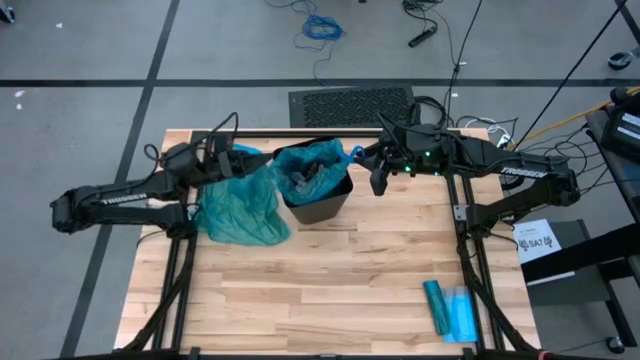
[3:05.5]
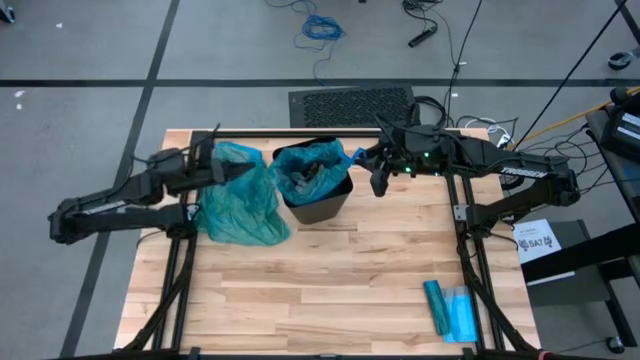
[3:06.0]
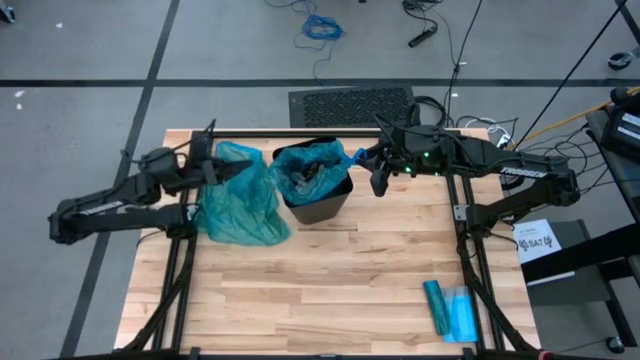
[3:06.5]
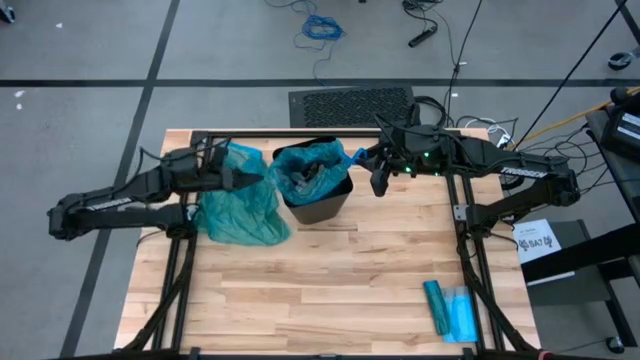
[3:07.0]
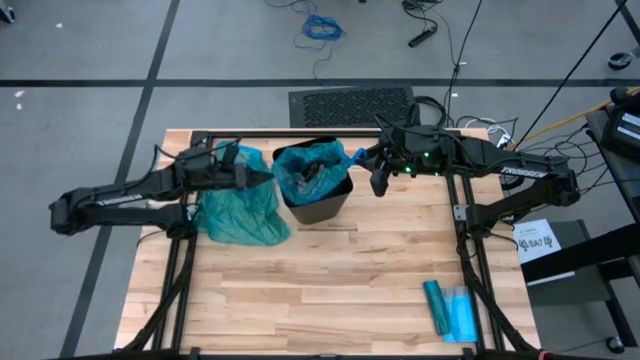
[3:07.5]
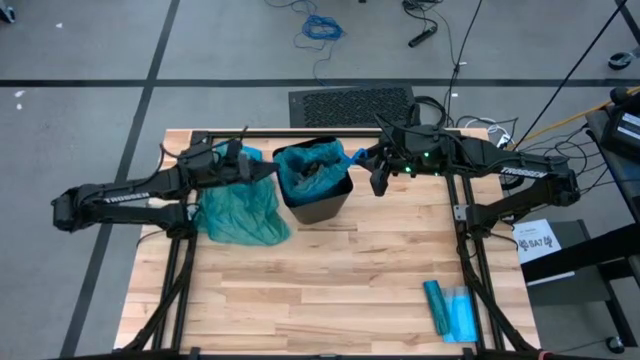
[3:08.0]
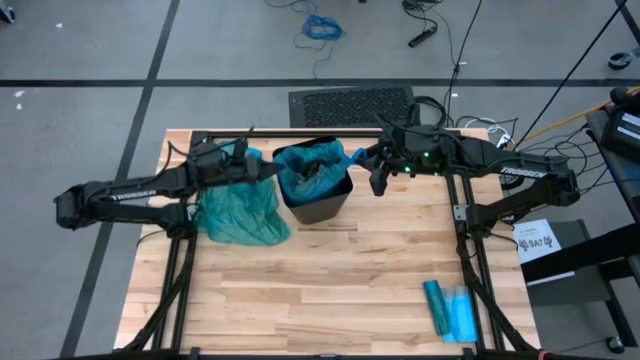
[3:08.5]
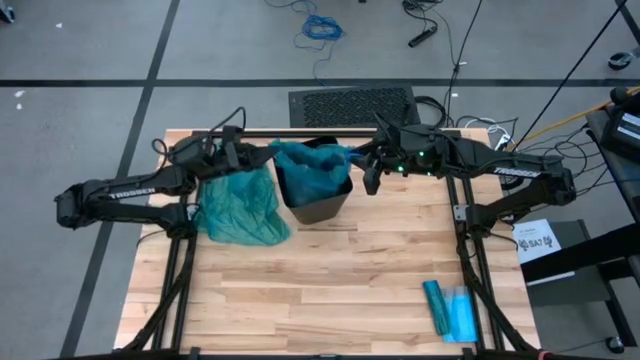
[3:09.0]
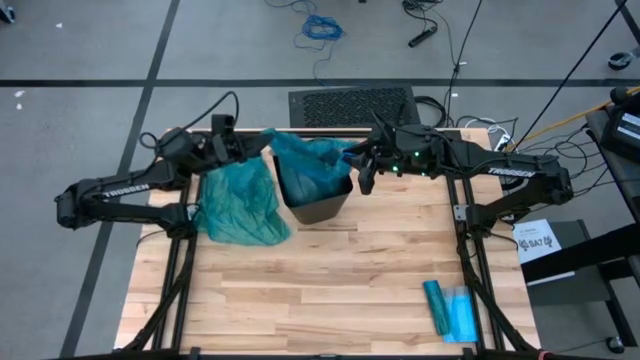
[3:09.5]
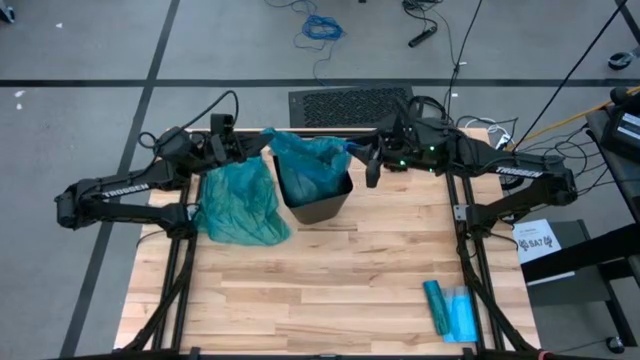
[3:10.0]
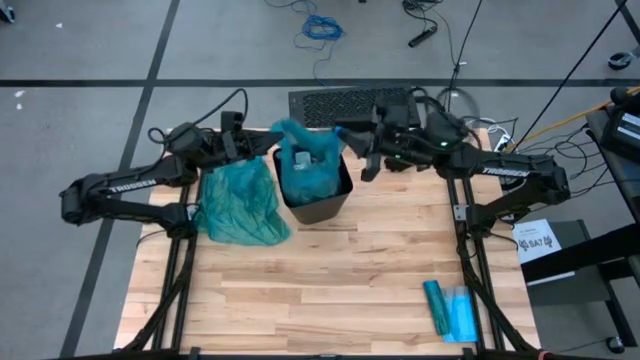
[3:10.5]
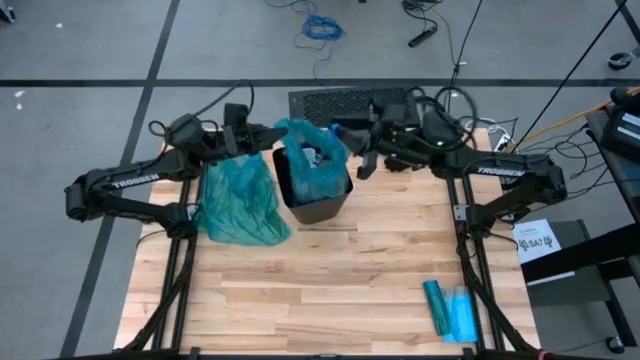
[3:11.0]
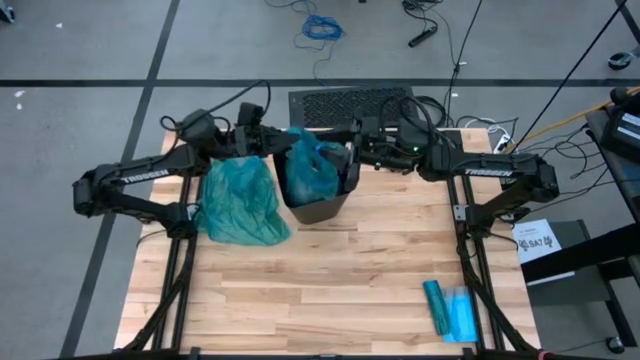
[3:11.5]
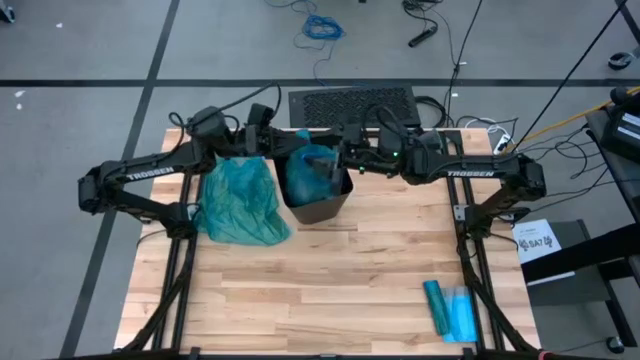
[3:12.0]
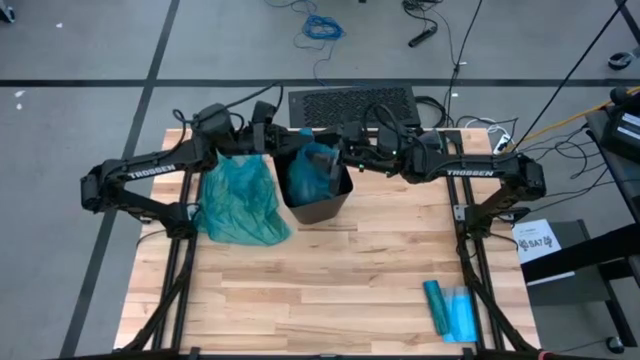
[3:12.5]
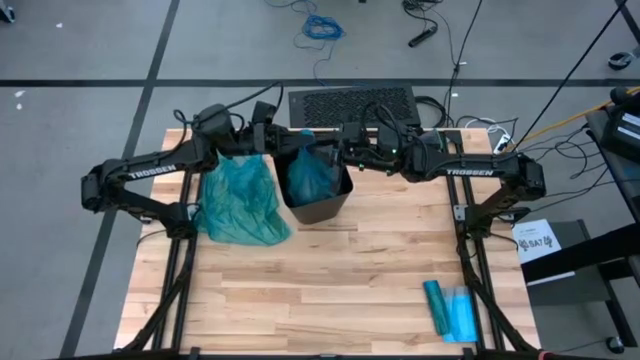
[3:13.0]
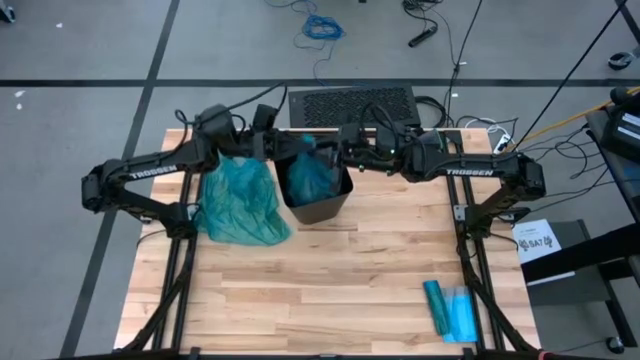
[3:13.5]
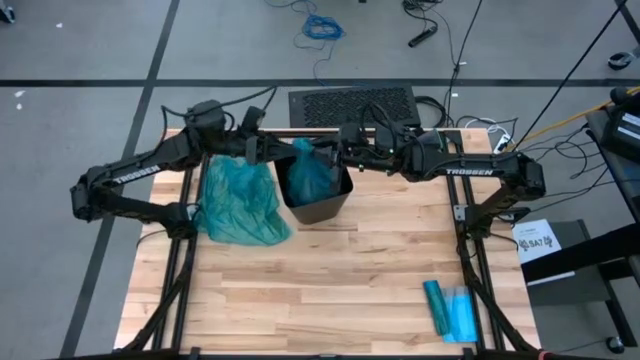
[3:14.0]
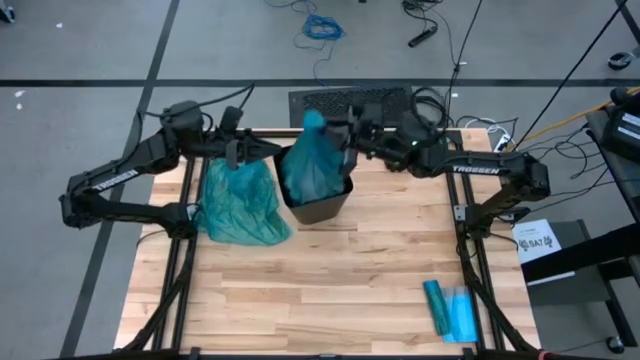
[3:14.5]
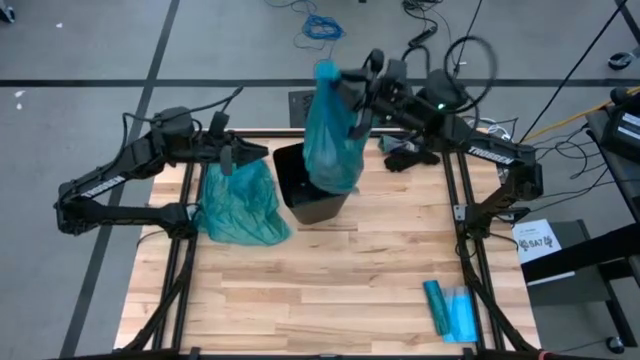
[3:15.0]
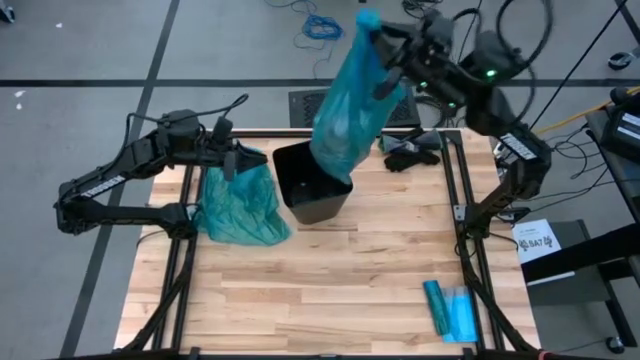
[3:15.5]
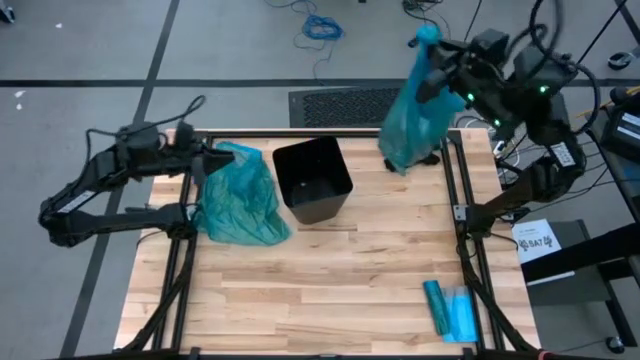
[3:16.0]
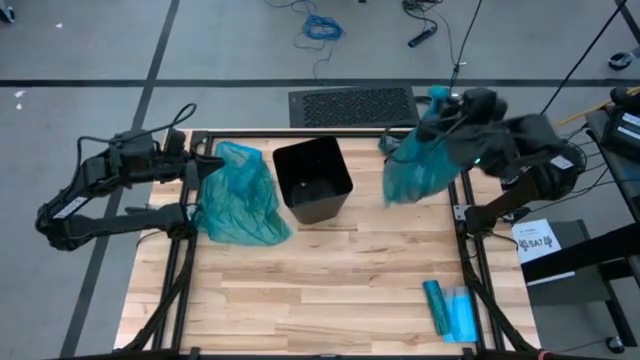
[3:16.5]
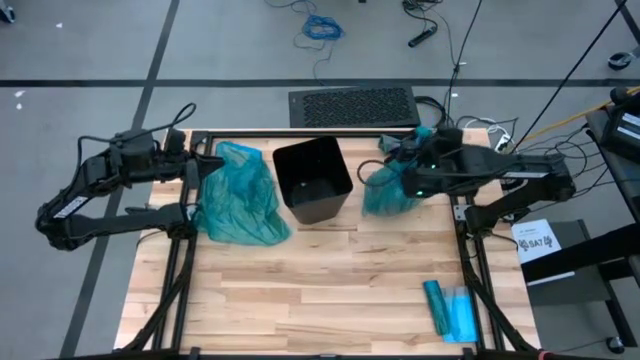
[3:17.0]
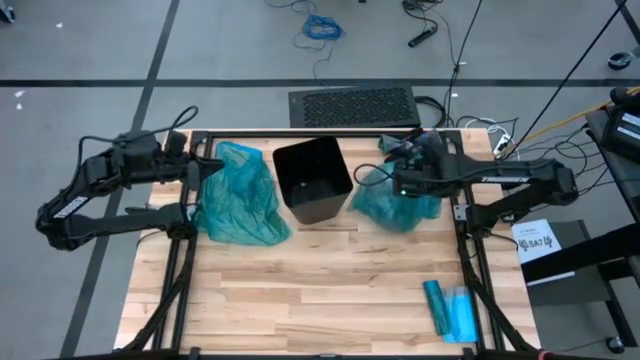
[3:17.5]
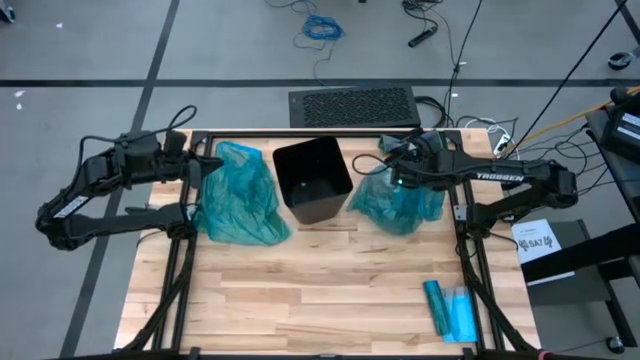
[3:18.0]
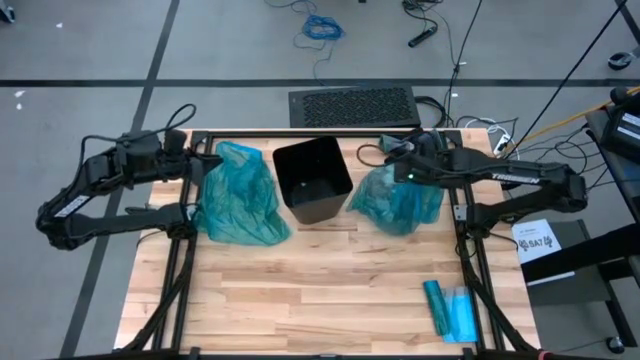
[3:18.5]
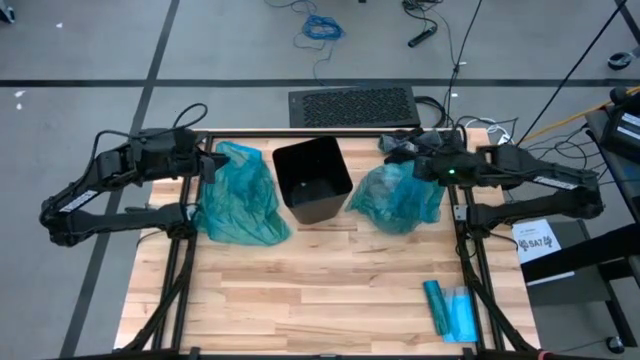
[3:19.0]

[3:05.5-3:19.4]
Task: place trash/remove bag and relplace
Remove the trash bag from the trash bin

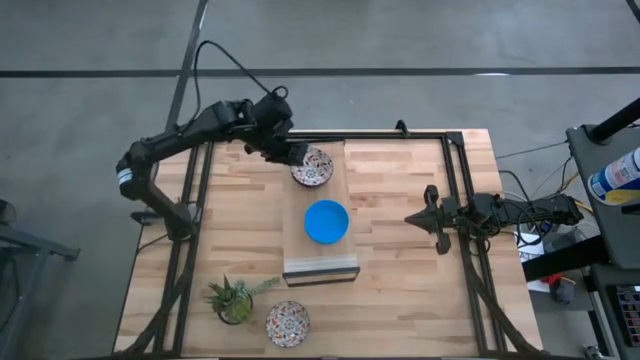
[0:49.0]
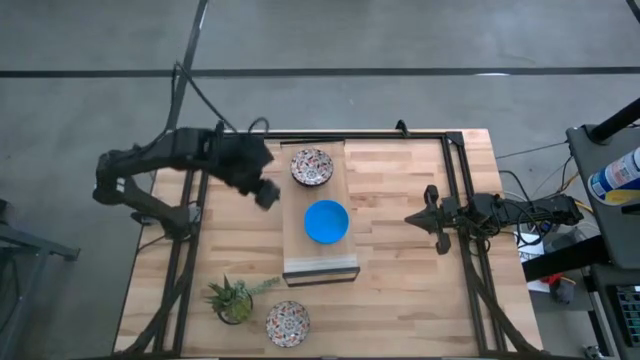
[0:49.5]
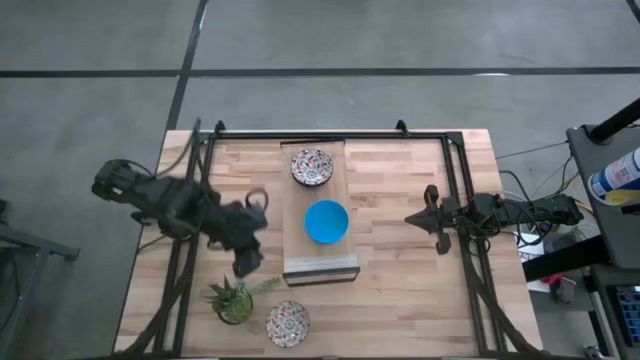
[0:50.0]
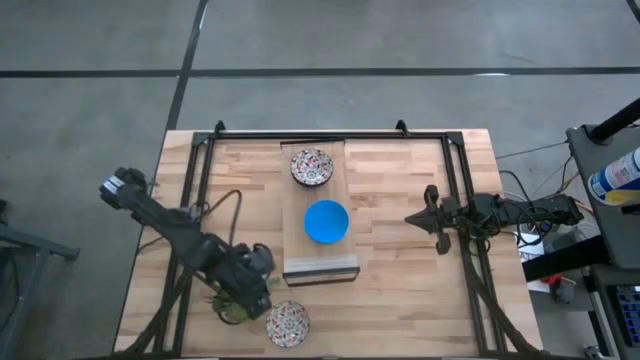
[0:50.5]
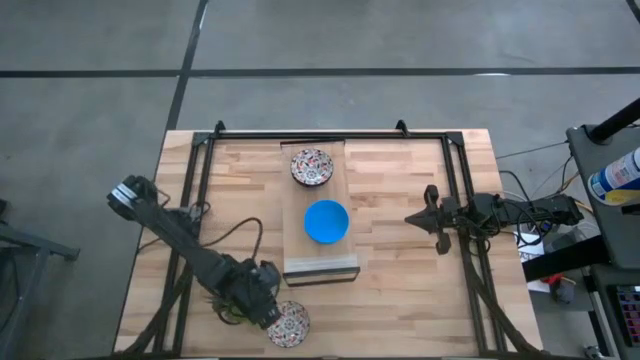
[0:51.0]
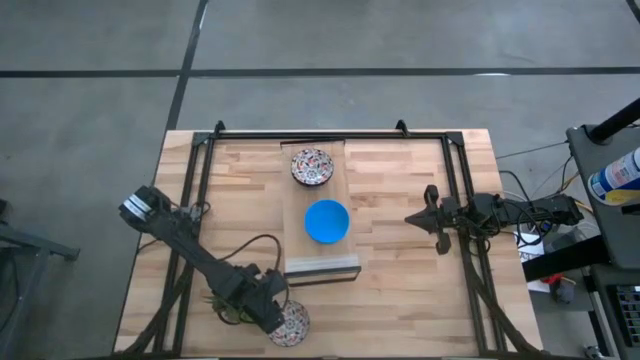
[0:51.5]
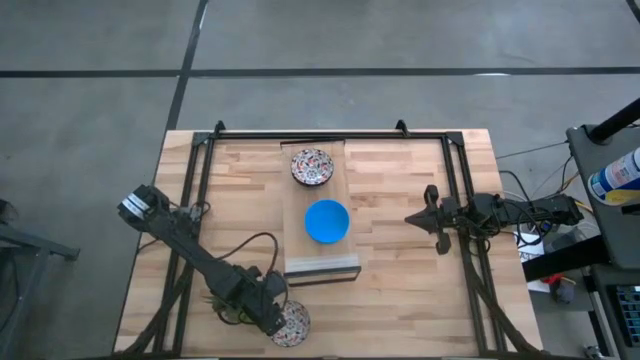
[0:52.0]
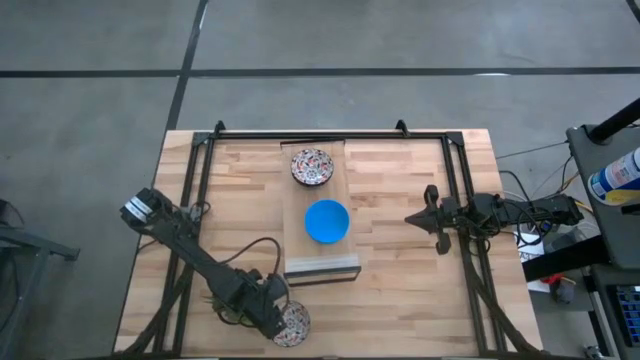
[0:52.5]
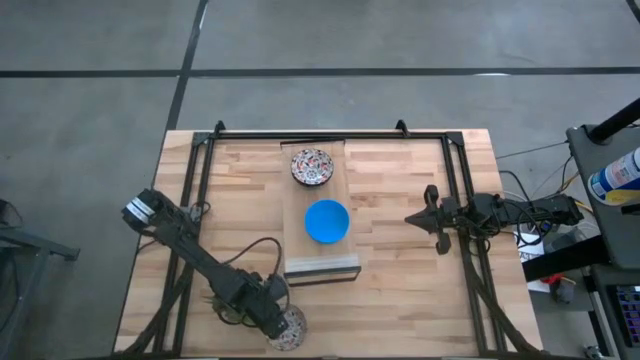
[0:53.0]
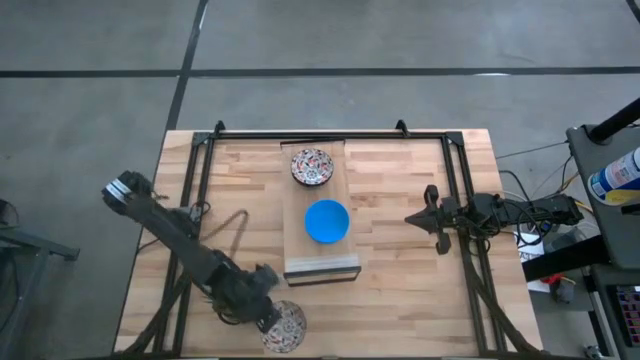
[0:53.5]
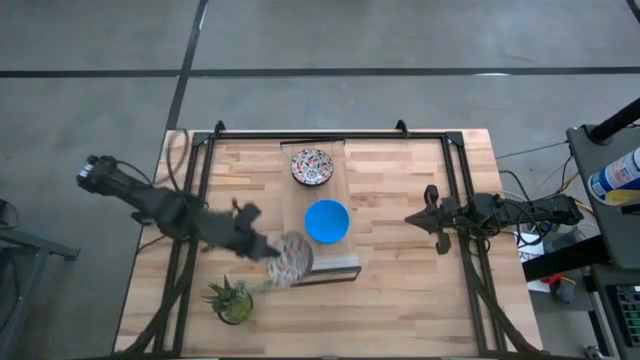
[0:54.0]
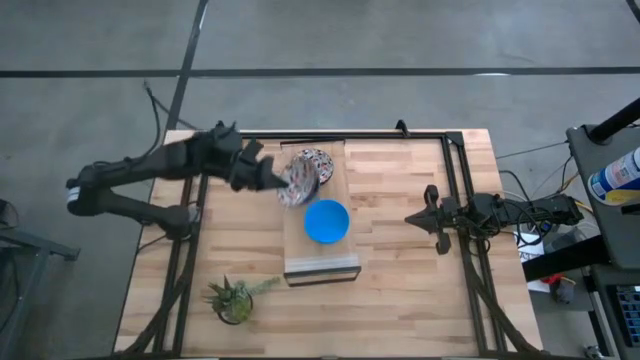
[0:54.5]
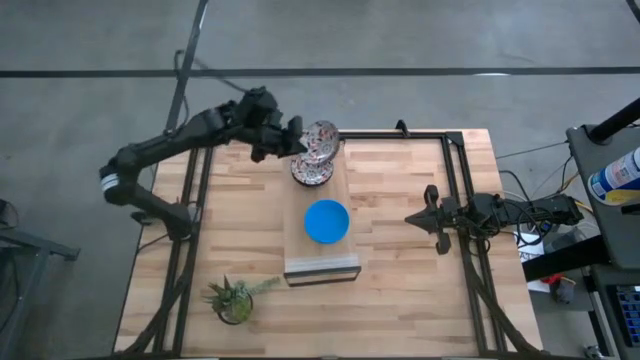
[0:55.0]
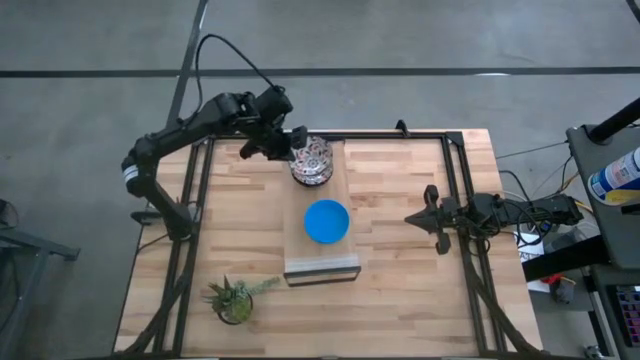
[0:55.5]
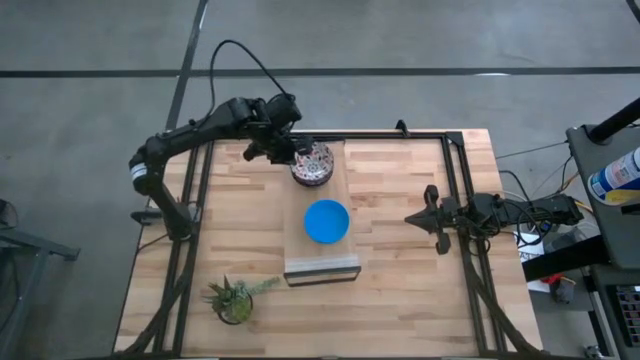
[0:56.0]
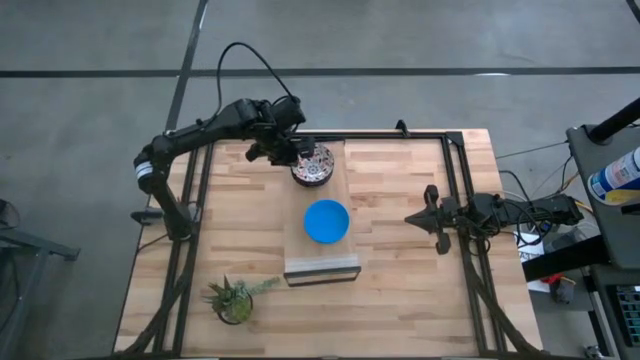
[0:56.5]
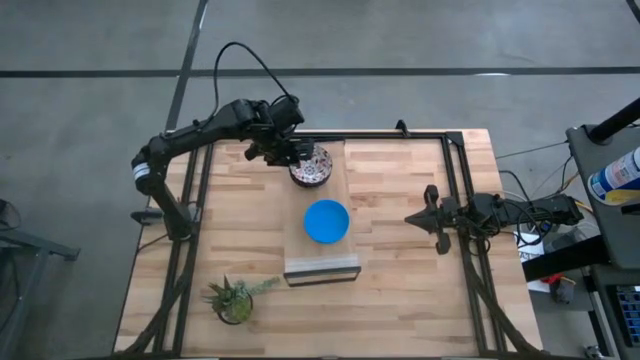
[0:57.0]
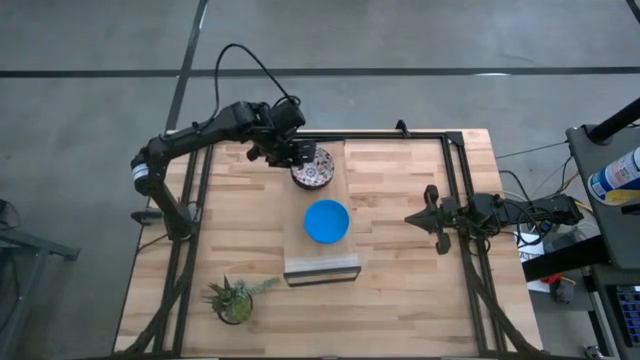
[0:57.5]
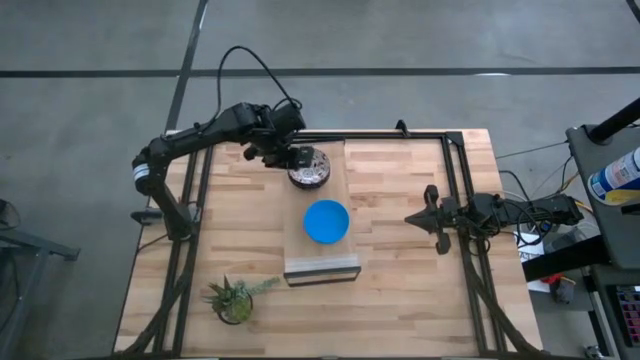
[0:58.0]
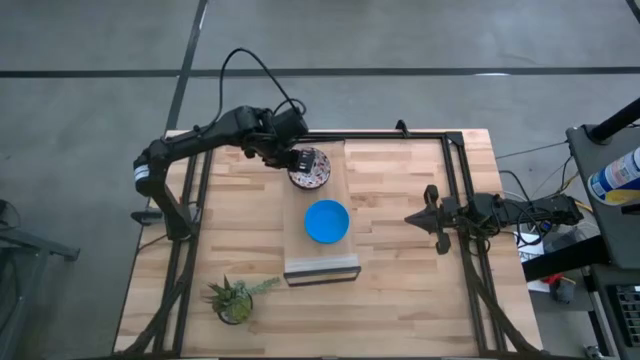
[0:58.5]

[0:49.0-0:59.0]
Task: Pick & Place Mini bowls
Stack the white bowl on top of the white bowls on the shelf
